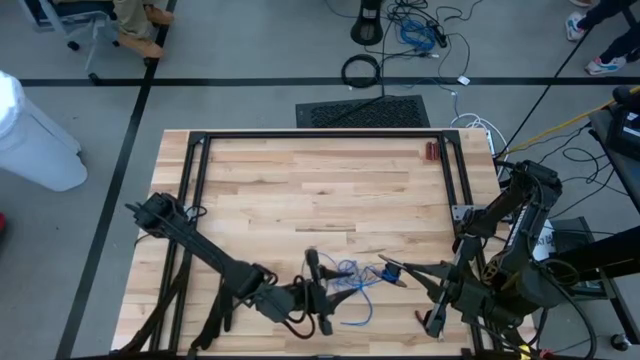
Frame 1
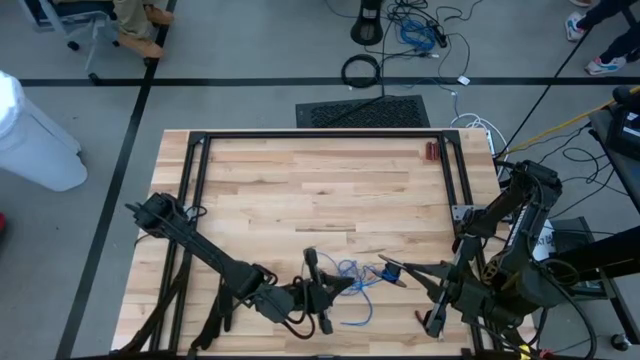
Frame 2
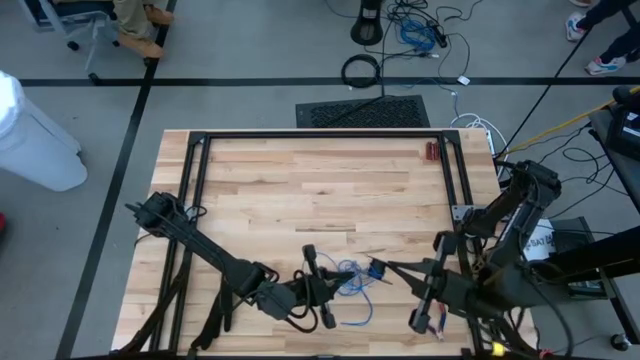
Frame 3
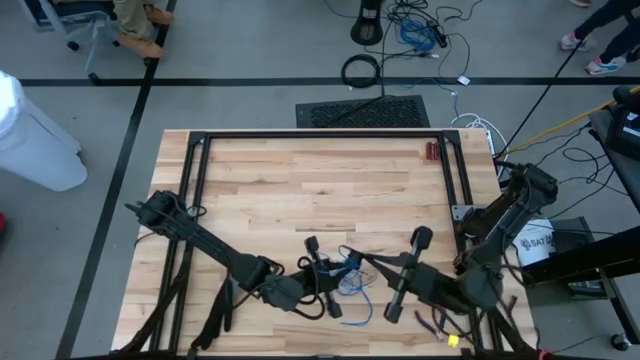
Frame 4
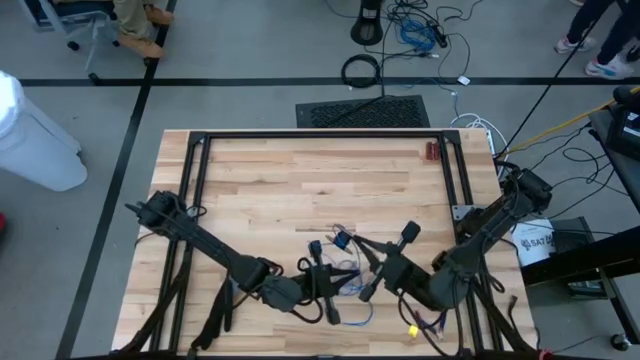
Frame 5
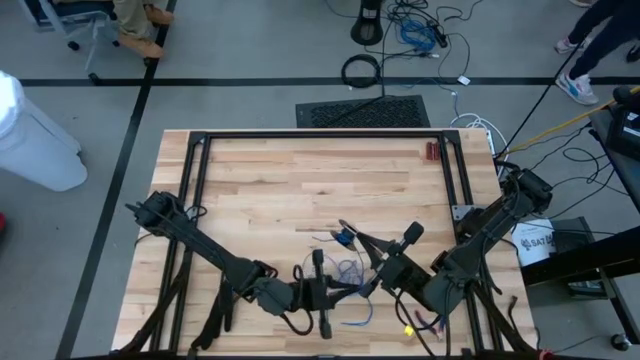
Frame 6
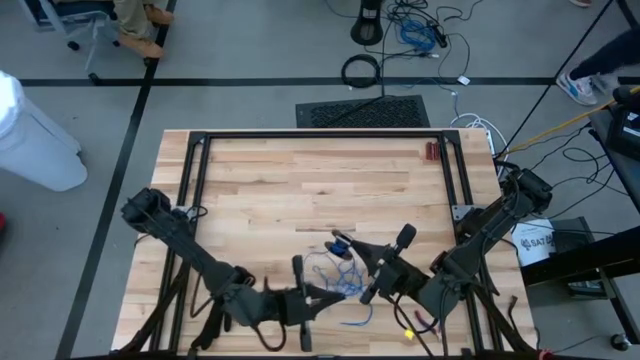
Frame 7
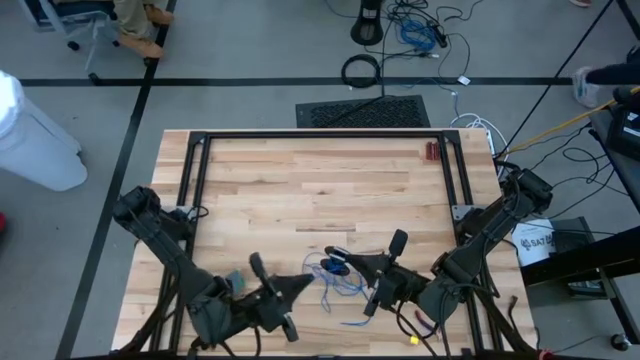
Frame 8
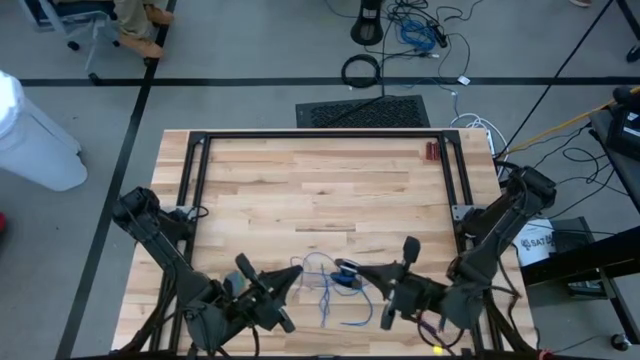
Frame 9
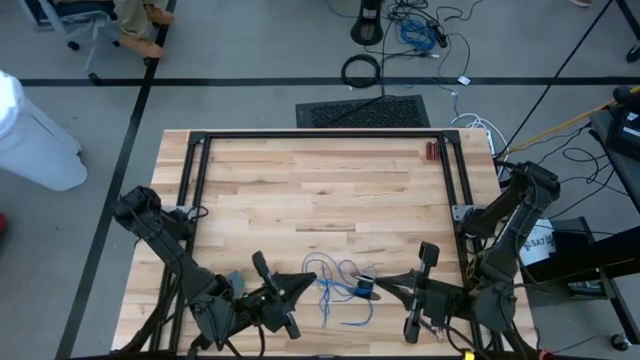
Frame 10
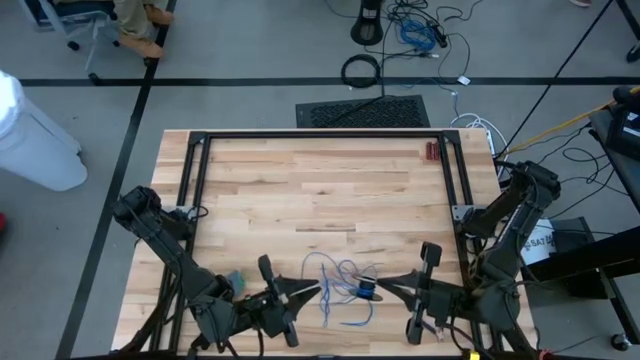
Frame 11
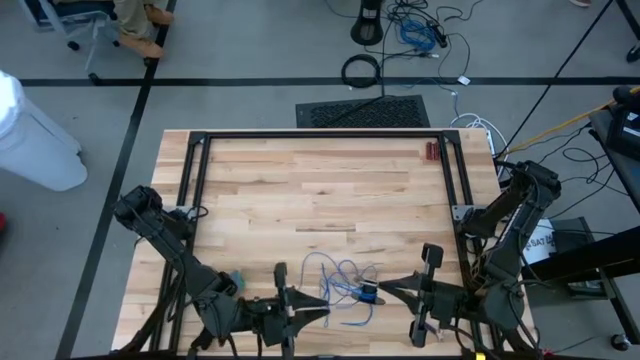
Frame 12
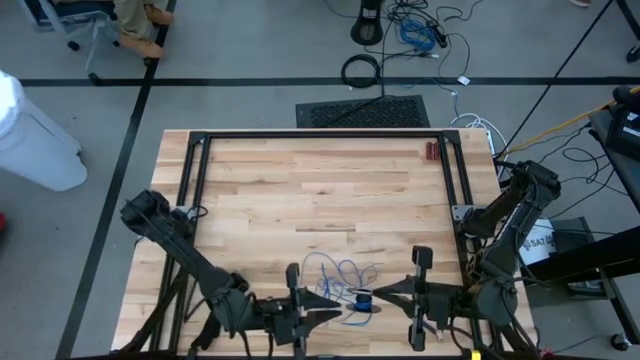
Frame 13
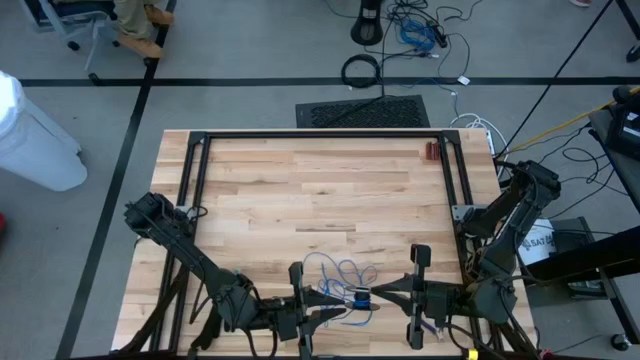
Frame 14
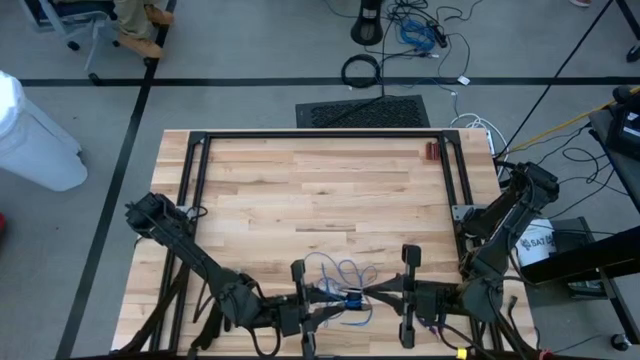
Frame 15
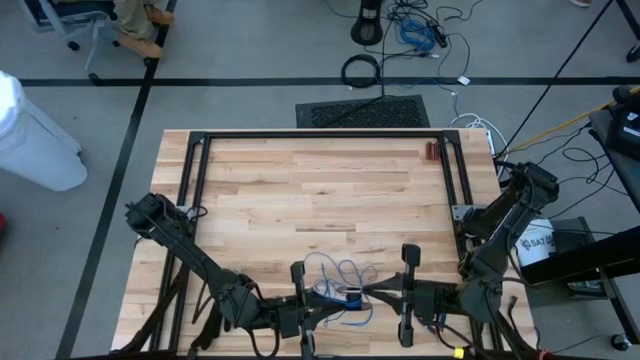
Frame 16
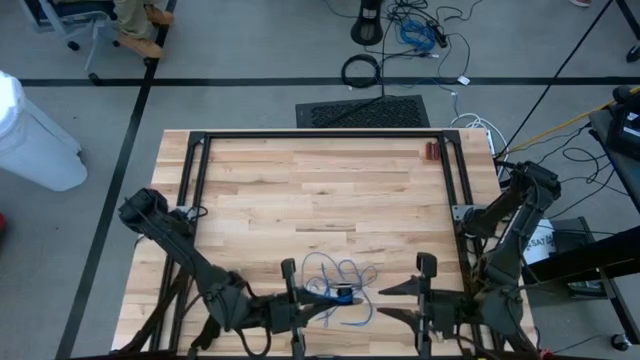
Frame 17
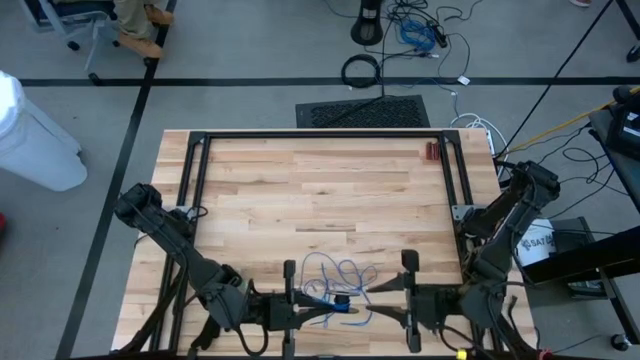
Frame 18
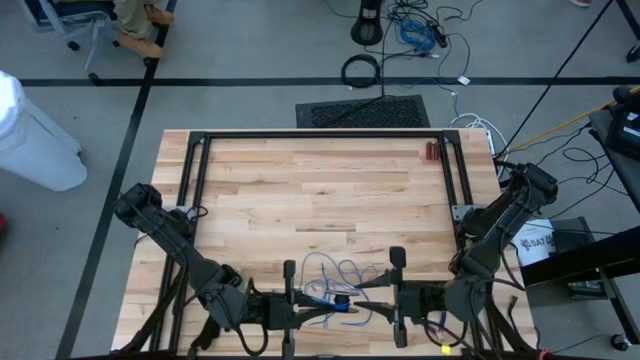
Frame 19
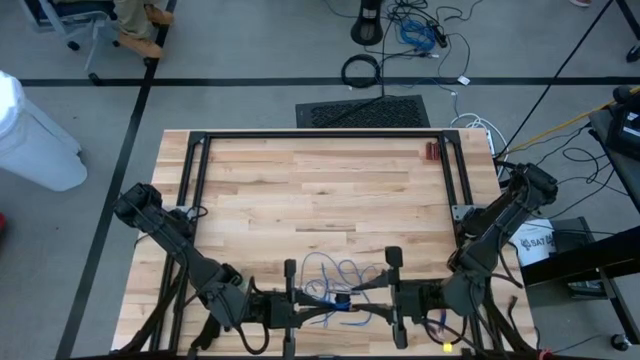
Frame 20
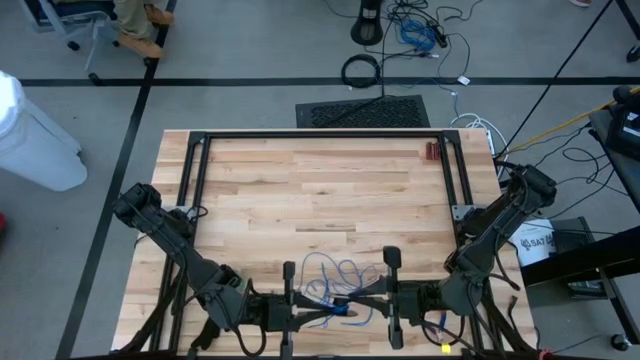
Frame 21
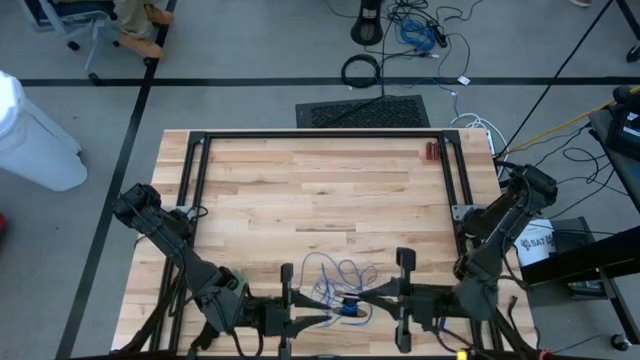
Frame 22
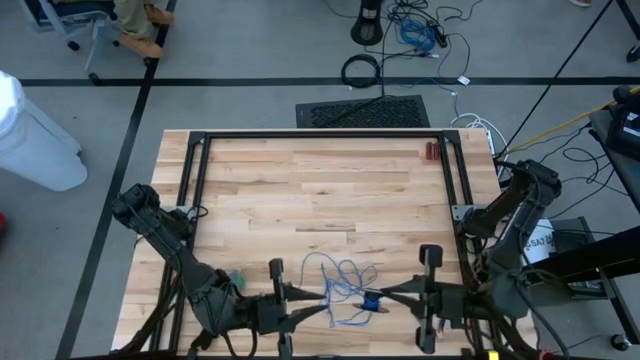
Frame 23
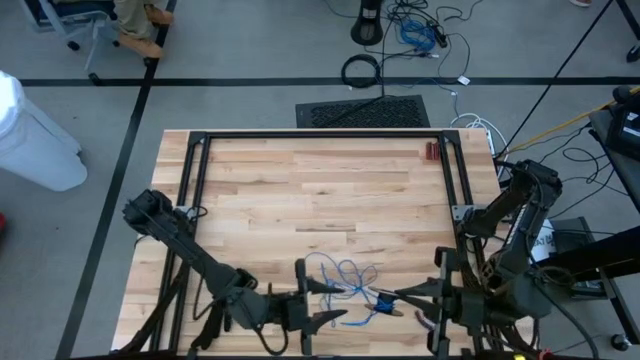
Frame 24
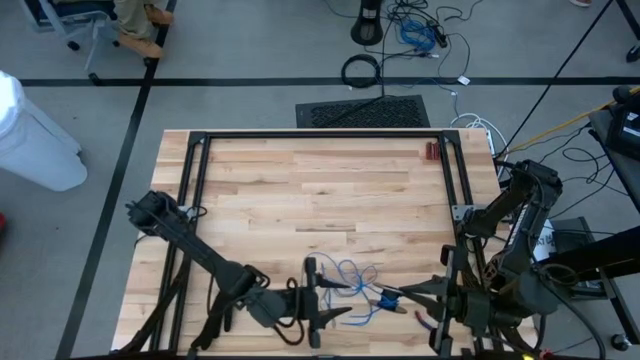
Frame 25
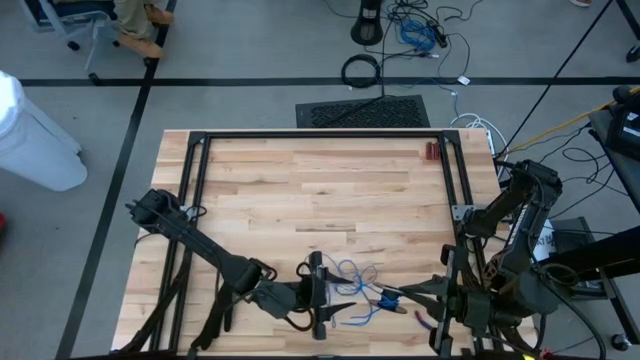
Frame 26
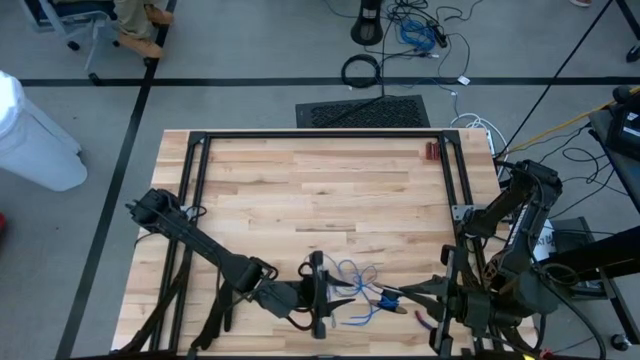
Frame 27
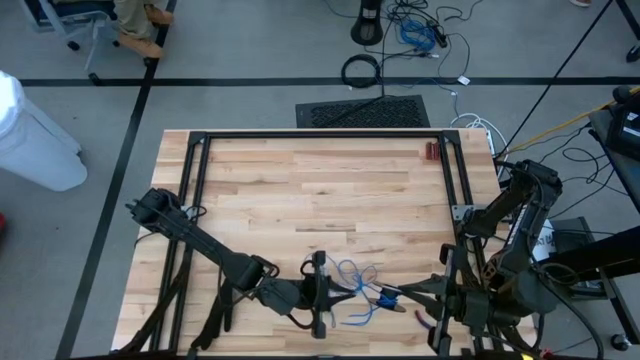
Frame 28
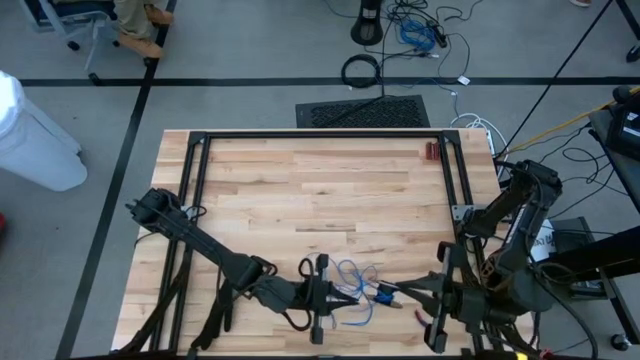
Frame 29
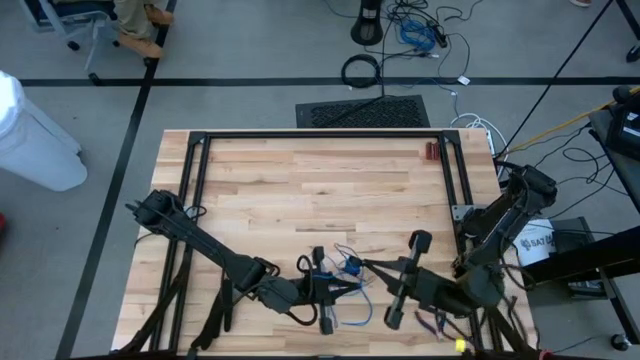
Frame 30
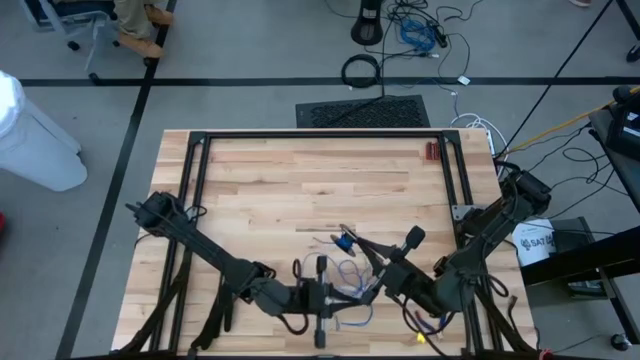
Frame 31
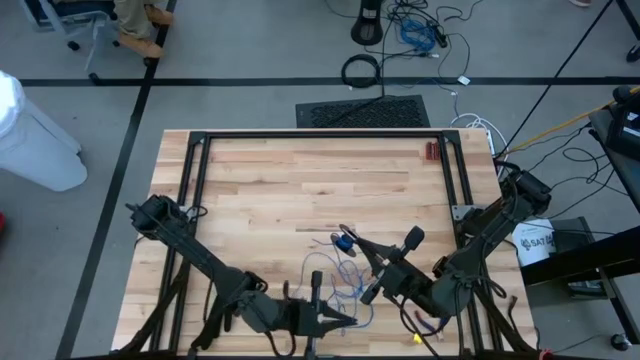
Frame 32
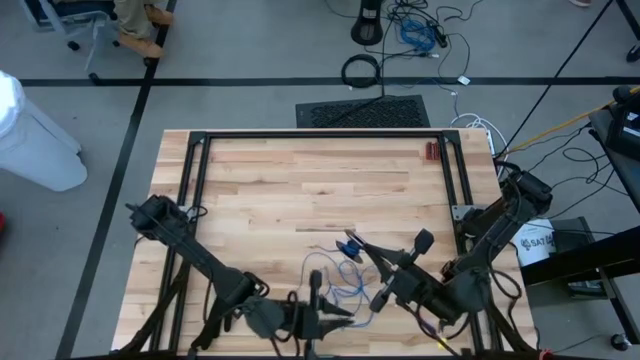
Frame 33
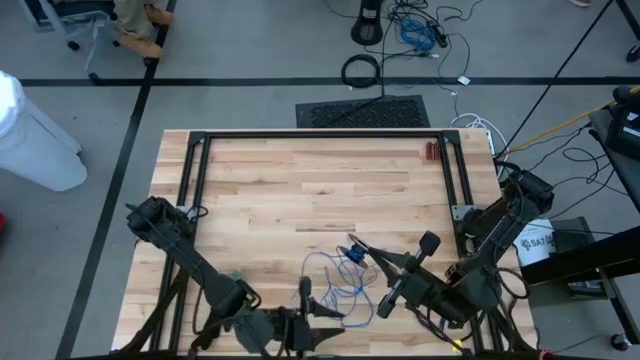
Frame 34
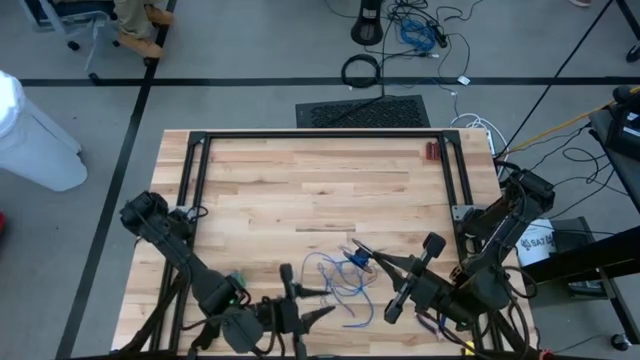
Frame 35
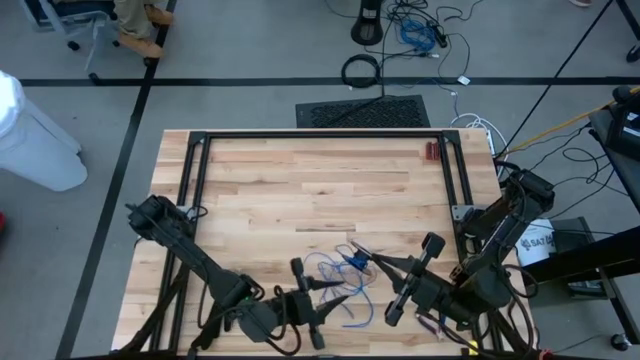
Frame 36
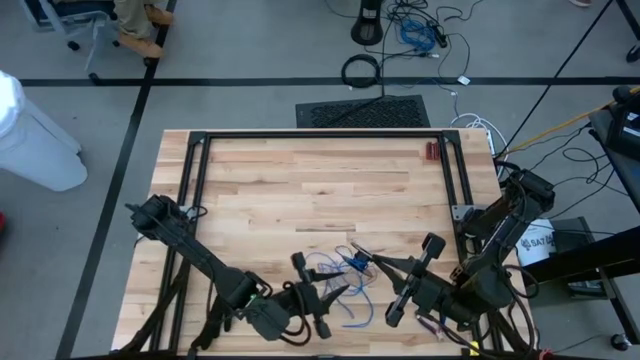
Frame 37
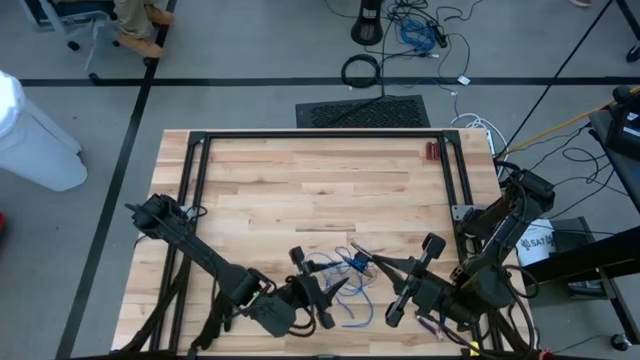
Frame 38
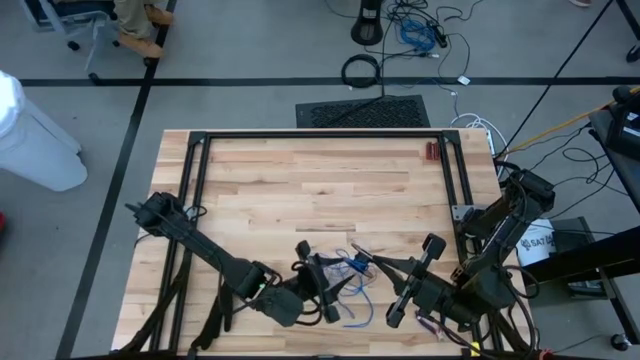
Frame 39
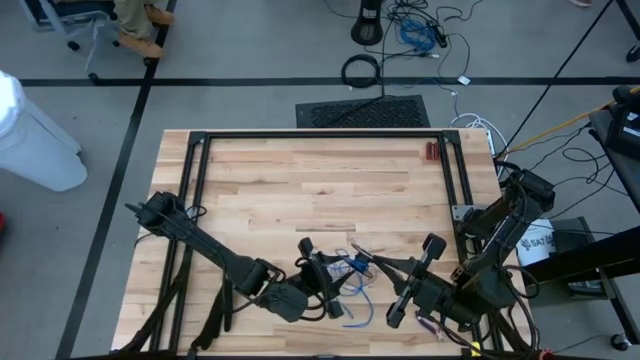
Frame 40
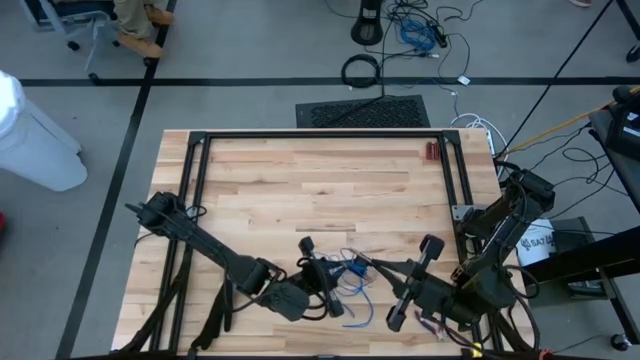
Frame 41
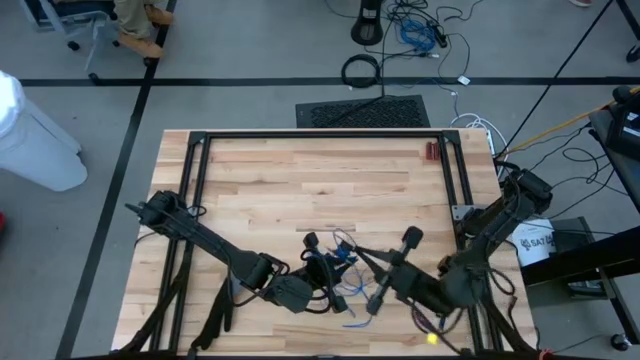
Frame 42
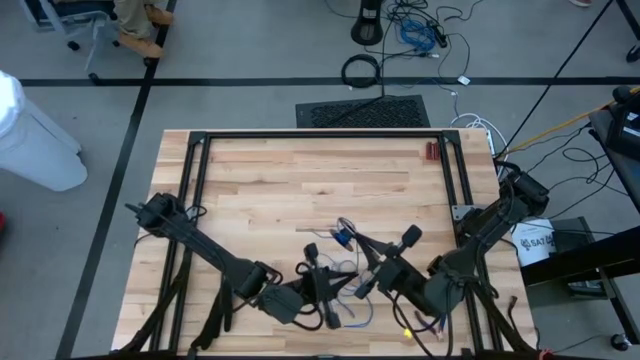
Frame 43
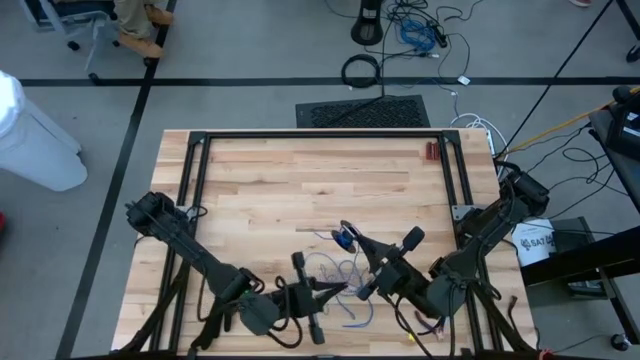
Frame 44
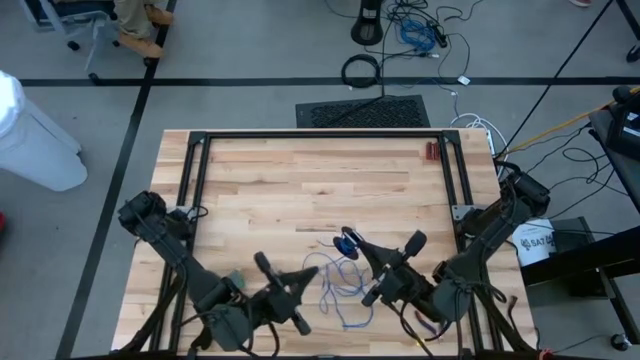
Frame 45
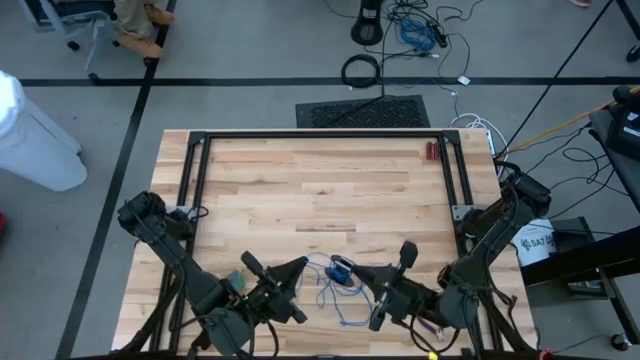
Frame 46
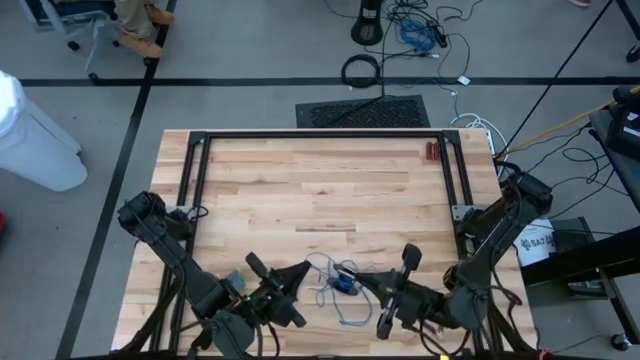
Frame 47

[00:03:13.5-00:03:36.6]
Task: Coil cords
Coil the blue wire onto the black spool
